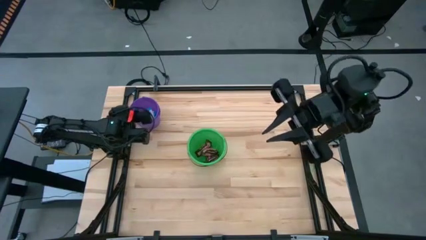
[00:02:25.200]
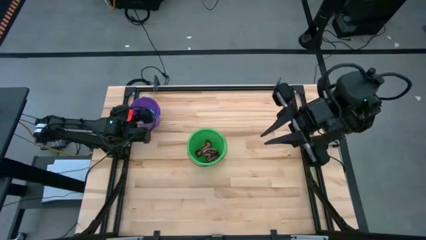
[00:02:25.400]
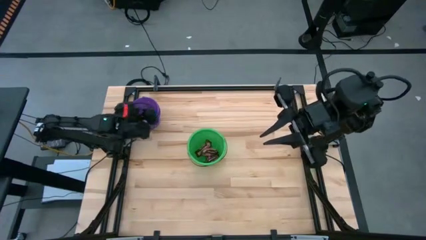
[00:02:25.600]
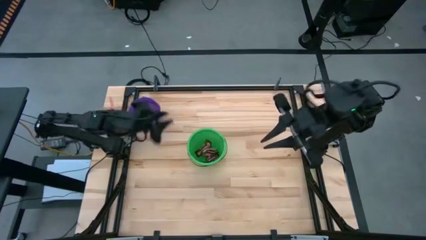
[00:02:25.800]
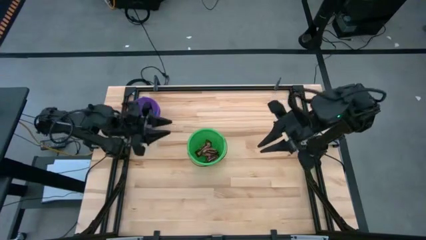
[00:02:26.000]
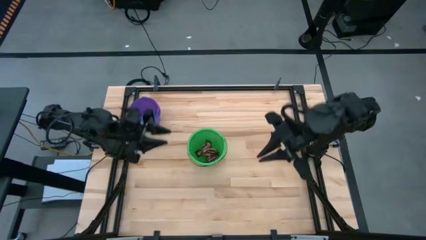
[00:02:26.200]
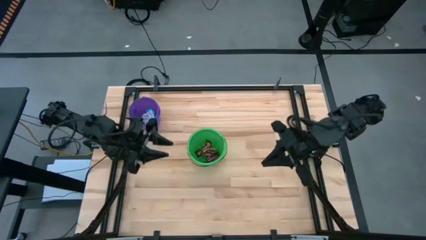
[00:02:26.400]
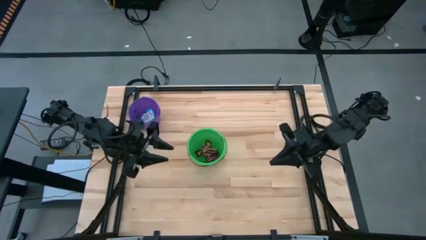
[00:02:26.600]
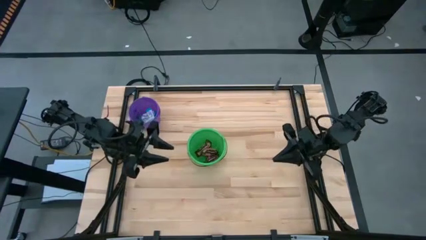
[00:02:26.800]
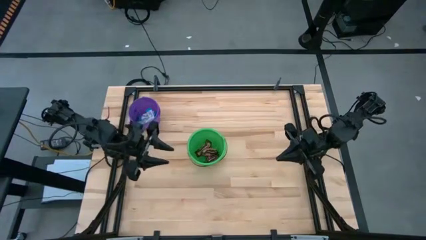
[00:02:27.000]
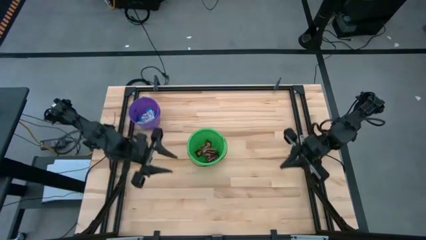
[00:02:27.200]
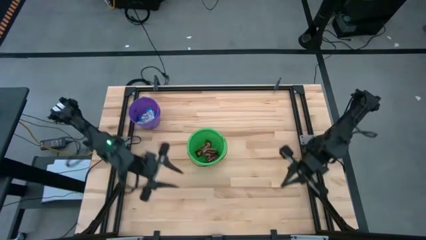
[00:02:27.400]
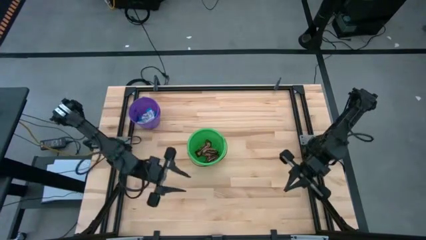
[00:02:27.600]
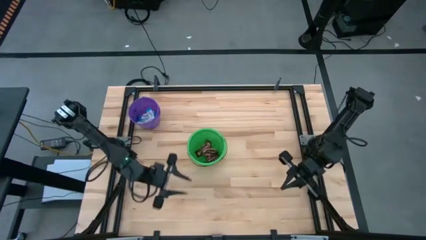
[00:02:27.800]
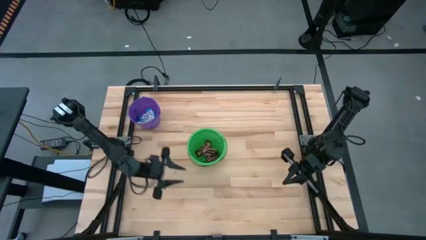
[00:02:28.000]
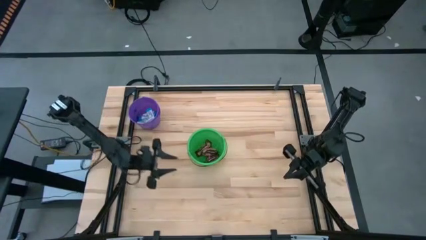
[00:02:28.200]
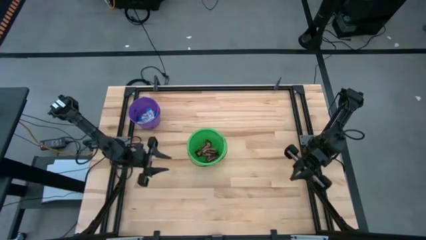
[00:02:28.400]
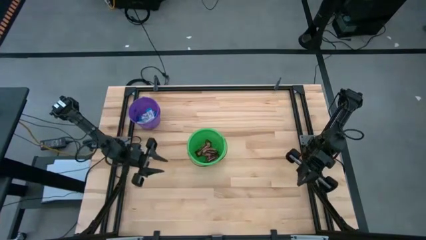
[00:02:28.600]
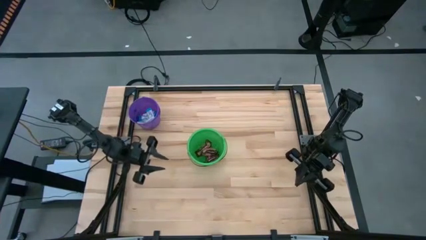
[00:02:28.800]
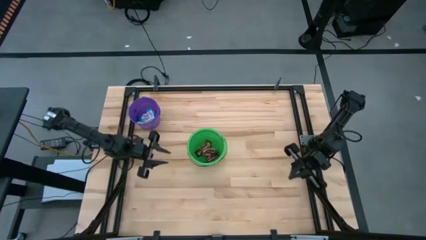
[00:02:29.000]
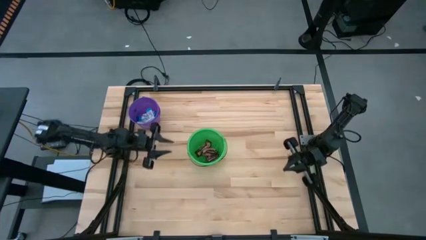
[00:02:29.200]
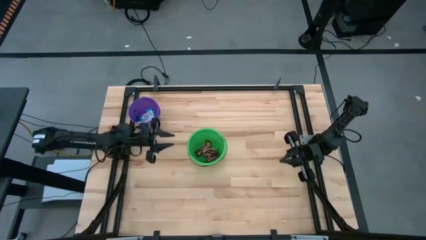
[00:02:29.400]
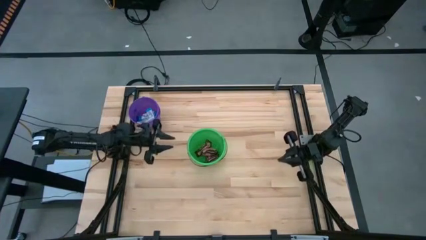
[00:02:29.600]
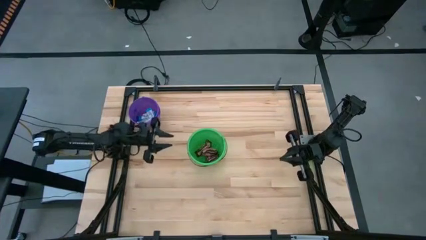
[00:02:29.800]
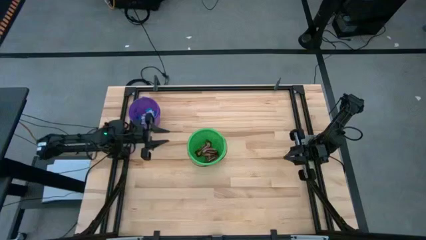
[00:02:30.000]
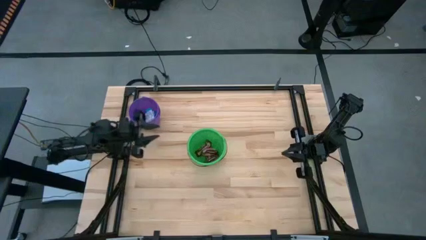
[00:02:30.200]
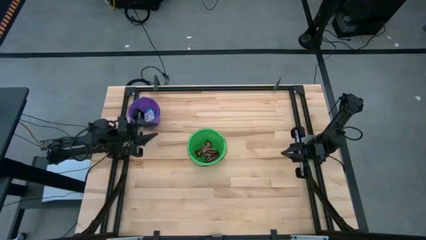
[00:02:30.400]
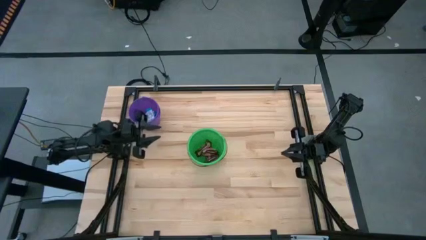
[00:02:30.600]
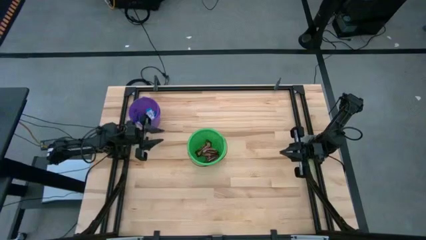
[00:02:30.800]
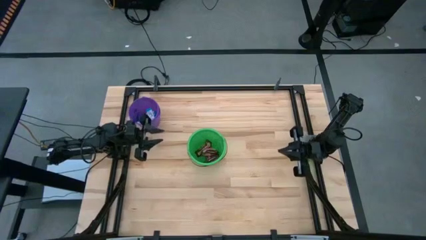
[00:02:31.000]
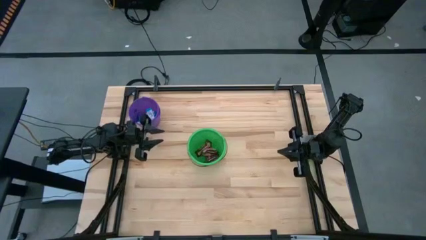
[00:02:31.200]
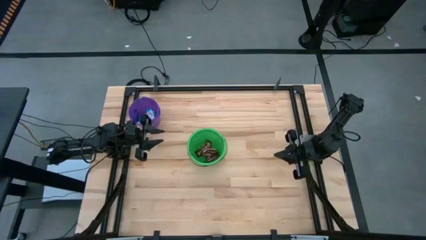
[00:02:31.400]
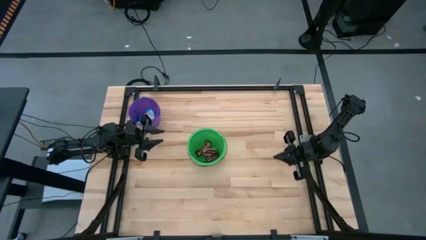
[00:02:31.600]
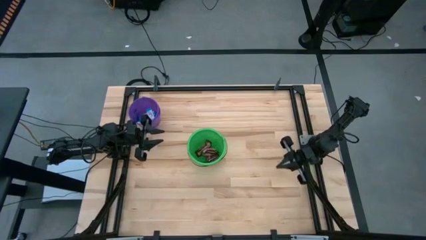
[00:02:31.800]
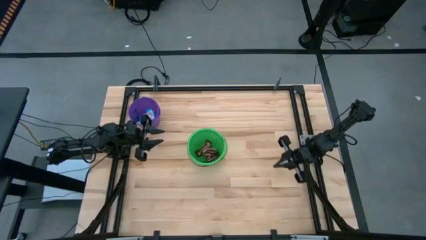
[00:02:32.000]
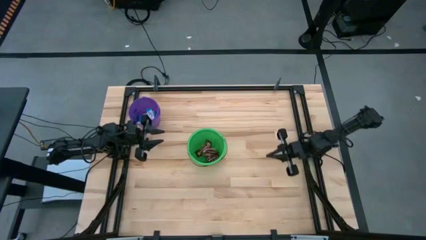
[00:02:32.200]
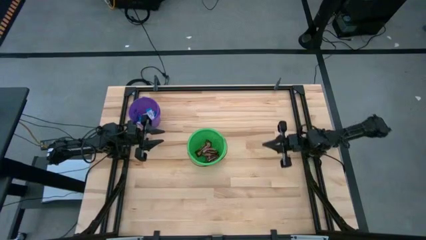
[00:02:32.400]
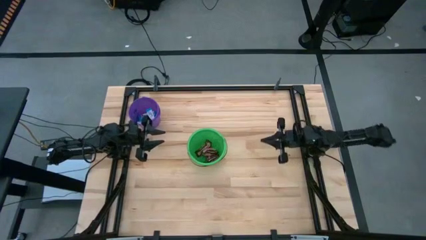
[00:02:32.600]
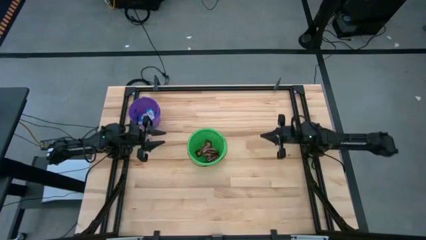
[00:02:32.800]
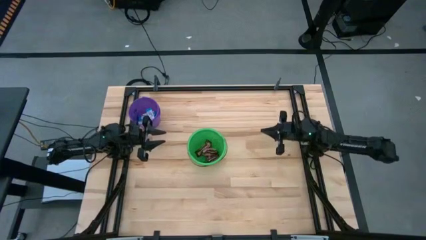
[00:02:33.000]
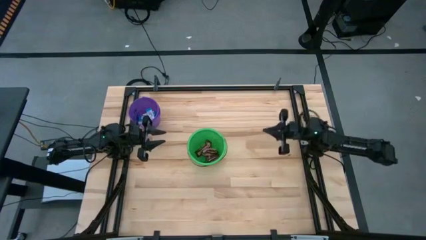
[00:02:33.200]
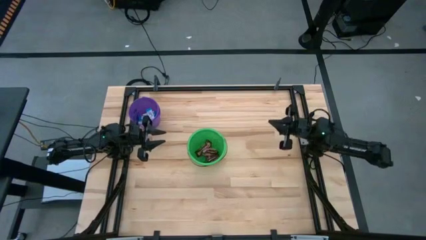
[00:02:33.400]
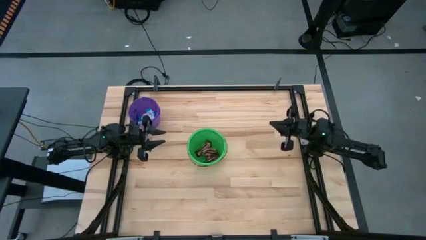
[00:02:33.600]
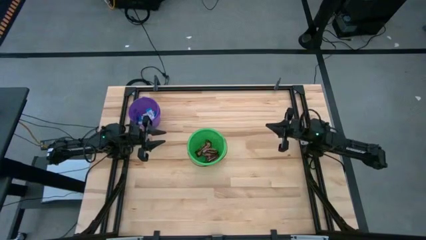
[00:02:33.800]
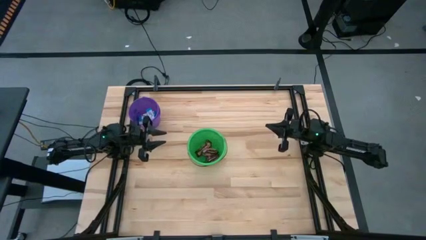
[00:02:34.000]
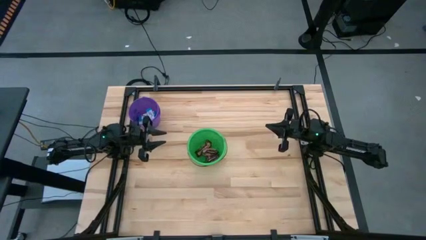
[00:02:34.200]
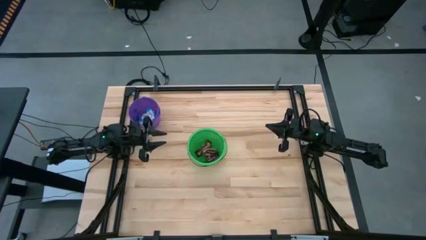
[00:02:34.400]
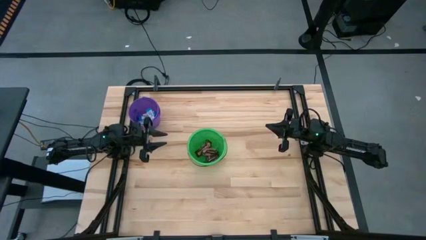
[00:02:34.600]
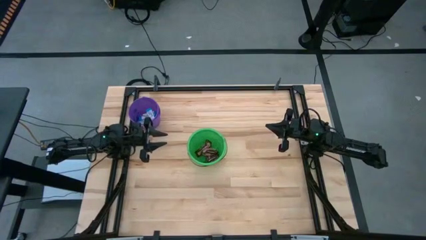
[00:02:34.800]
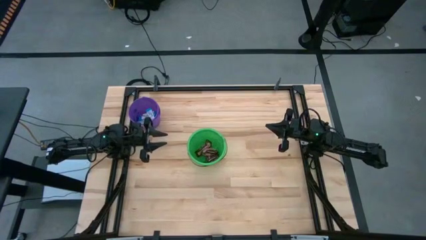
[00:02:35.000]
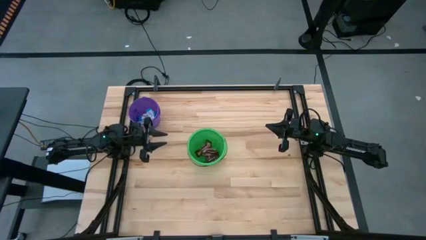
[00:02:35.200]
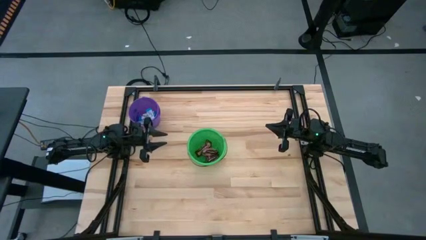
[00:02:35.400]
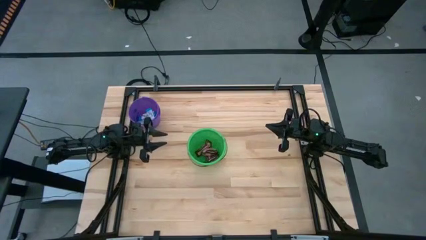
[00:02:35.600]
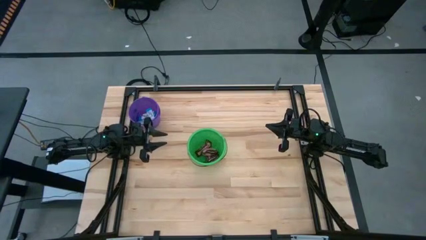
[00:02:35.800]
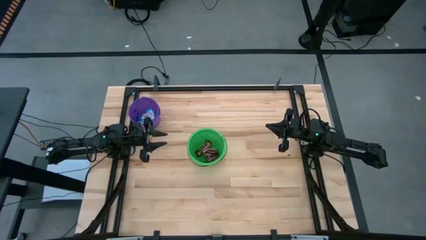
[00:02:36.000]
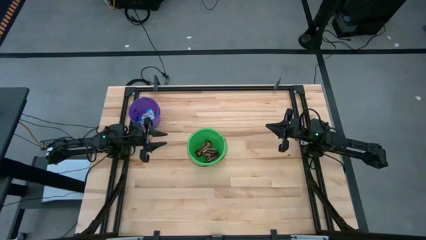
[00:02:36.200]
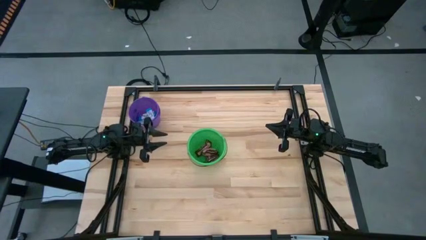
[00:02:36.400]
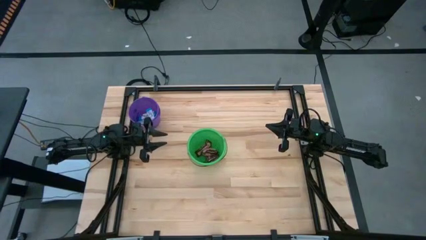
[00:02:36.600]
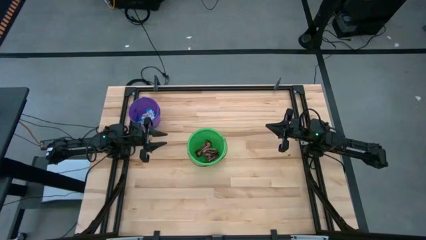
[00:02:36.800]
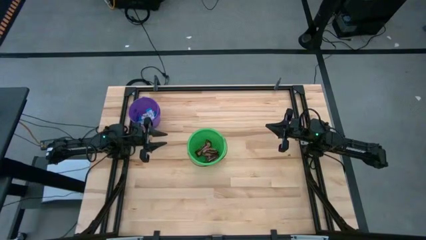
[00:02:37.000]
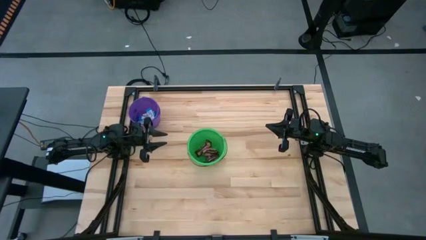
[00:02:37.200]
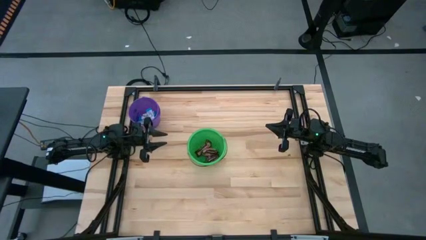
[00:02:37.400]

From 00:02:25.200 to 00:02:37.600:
Task: Sort candy by brand, put in halloween buckets
Return to Home Position

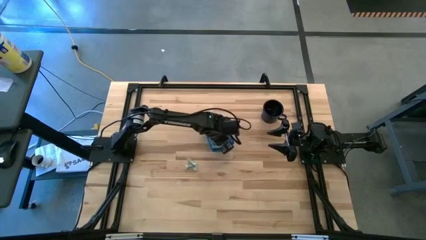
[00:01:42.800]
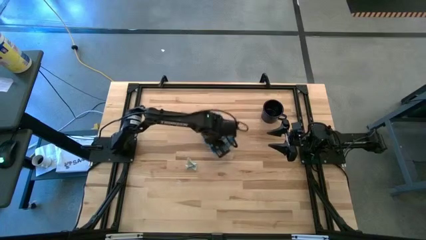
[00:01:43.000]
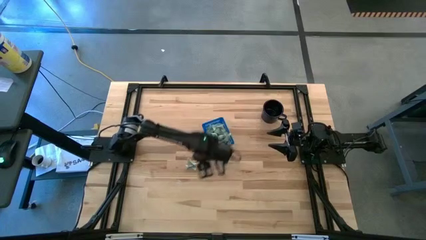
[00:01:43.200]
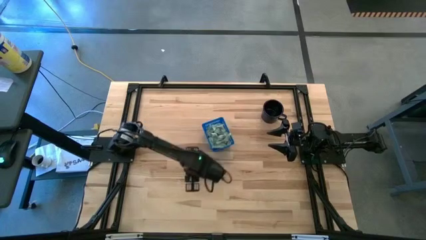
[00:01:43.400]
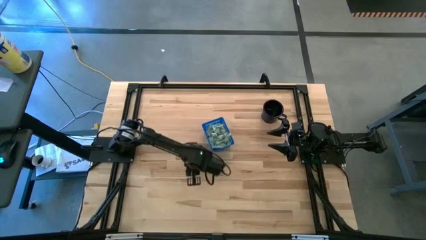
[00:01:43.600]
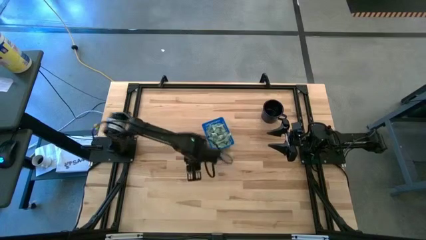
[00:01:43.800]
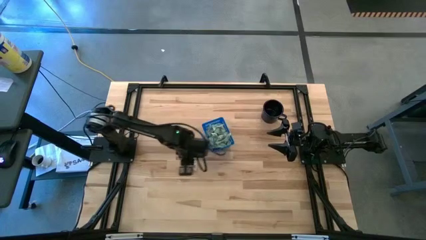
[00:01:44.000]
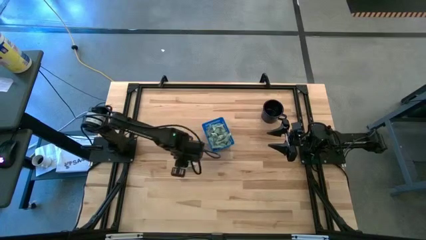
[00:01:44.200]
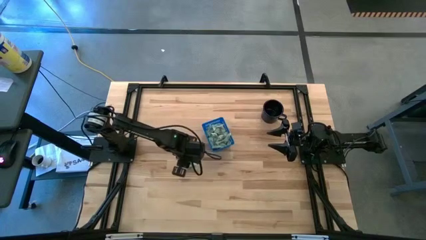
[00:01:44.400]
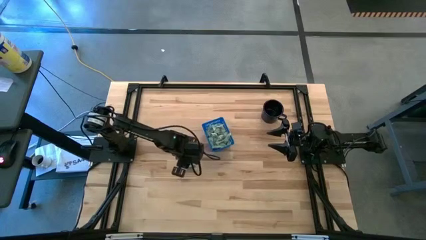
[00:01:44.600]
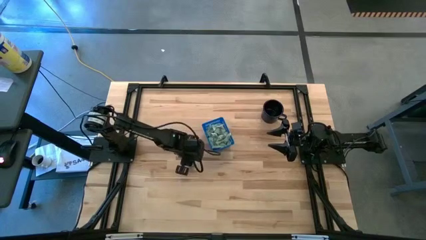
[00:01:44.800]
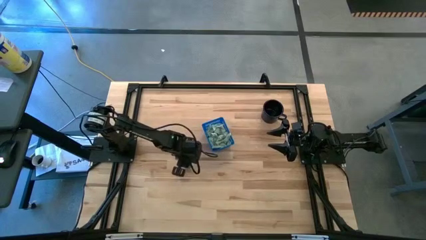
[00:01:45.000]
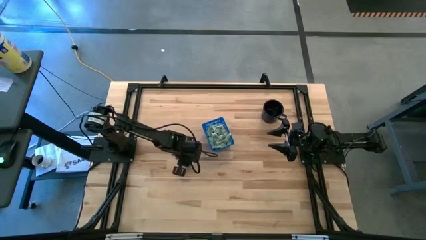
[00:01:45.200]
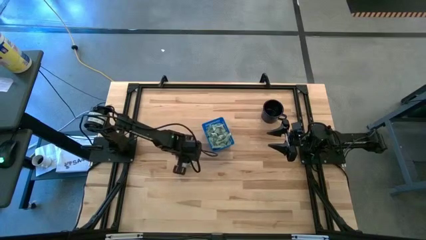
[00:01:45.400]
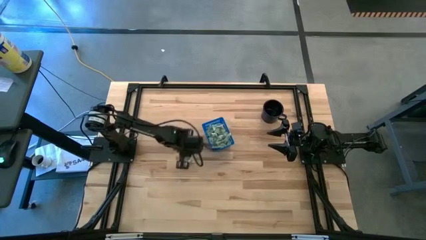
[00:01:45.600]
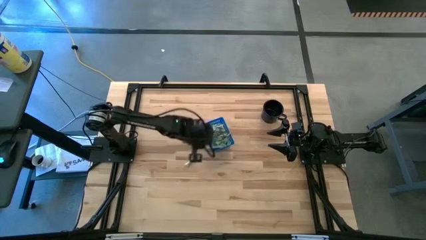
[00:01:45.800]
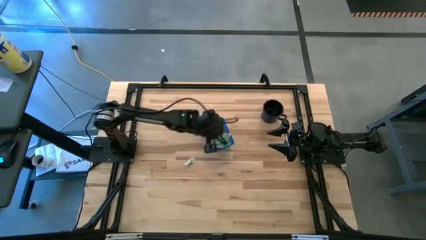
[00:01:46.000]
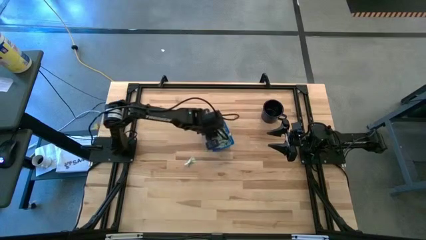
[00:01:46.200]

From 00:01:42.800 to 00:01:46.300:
Task: Pick and place Stevia / Truvia into bins
Put the top stevia packet into the basket

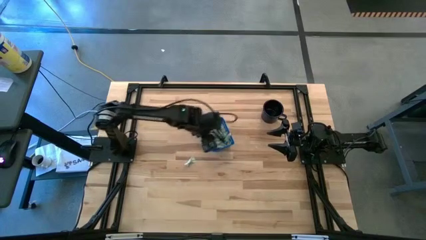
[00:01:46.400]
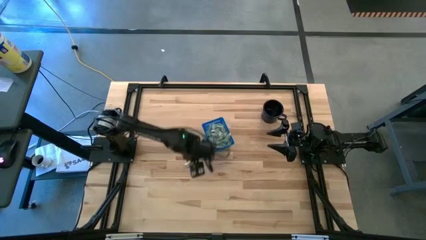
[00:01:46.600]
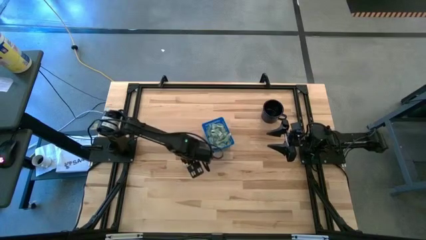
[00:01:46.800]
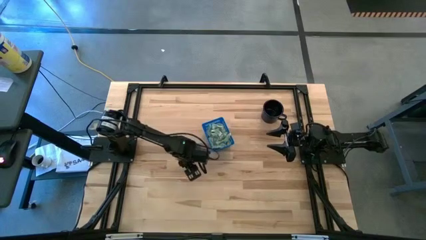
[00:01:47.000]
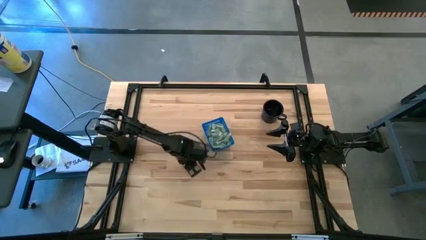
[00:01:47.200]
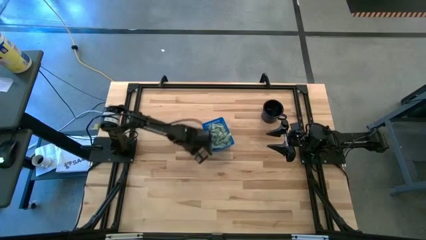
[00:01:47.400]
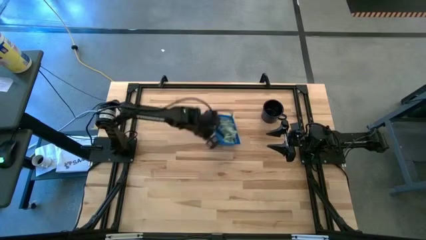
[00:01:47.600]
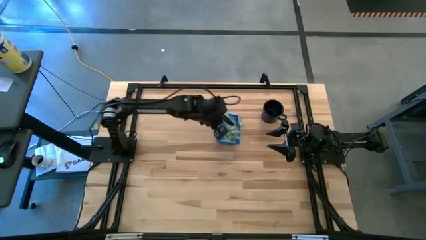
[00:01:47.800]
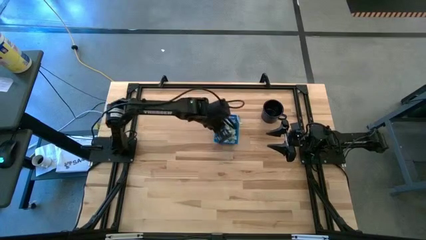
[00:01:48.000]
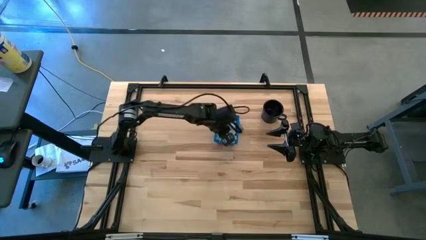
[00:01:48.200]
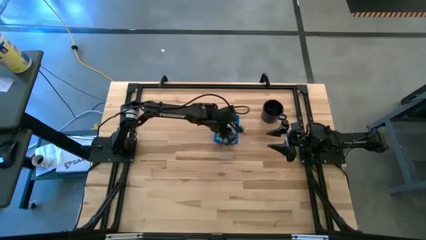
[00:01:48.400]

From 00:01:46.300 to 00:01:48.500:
Put the bottom stevia packet into the basket
